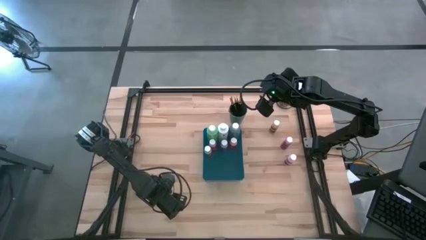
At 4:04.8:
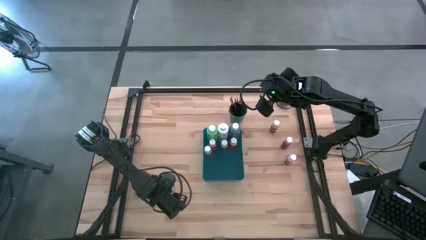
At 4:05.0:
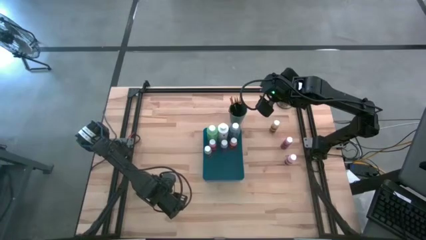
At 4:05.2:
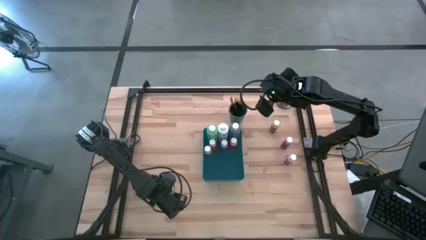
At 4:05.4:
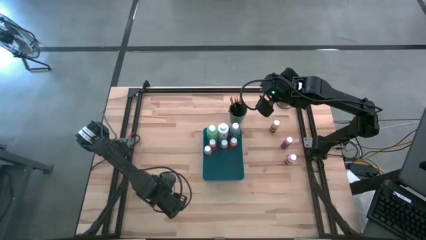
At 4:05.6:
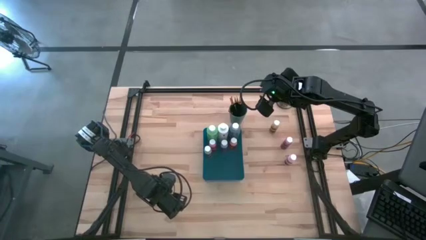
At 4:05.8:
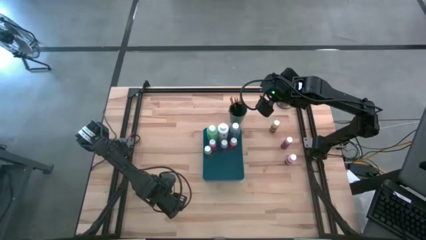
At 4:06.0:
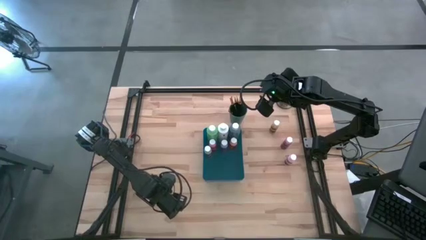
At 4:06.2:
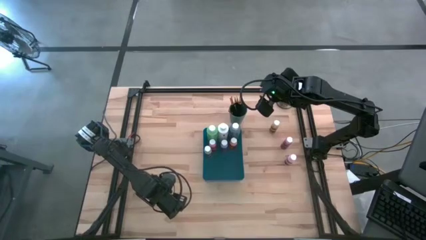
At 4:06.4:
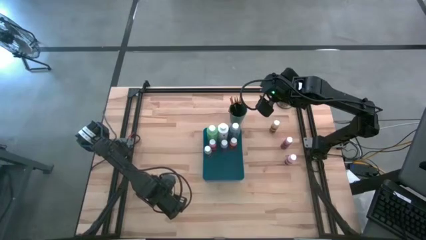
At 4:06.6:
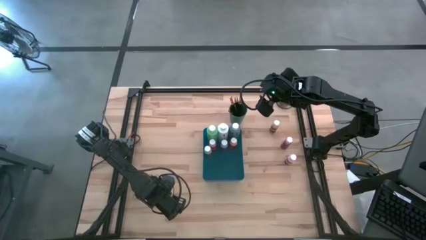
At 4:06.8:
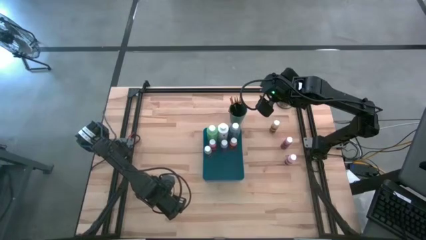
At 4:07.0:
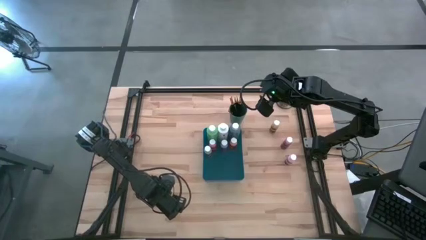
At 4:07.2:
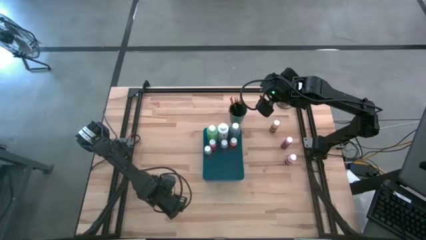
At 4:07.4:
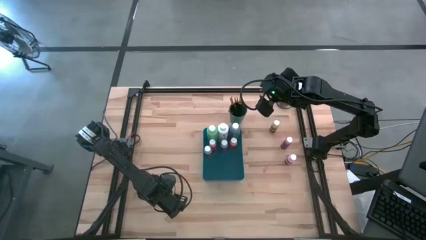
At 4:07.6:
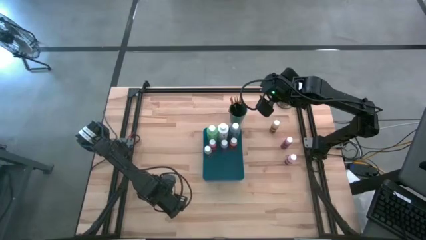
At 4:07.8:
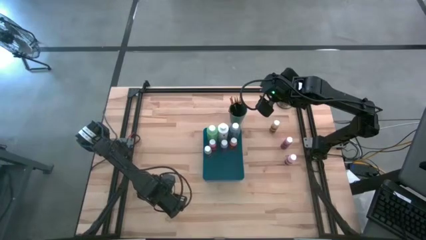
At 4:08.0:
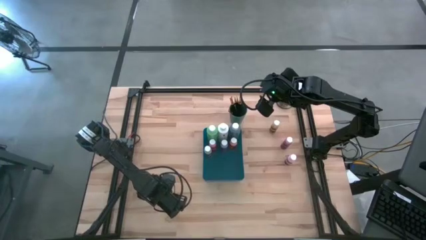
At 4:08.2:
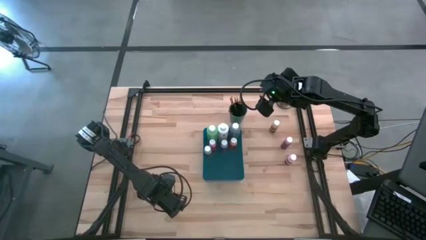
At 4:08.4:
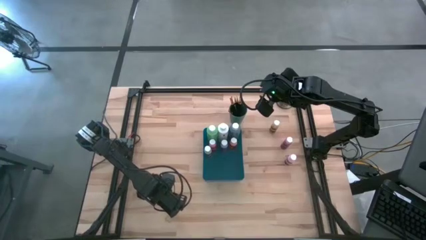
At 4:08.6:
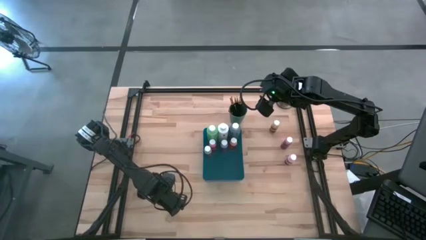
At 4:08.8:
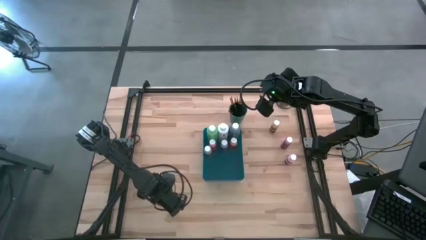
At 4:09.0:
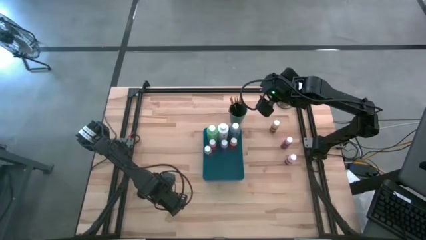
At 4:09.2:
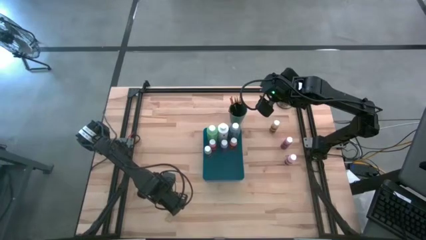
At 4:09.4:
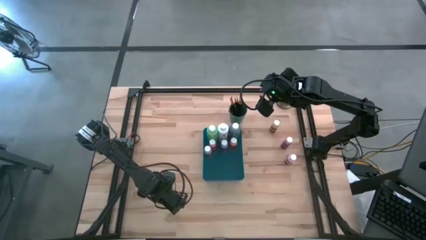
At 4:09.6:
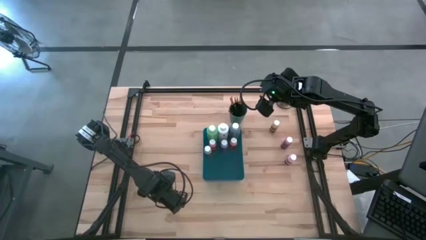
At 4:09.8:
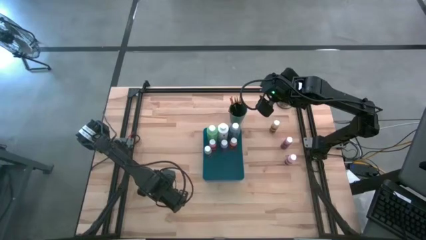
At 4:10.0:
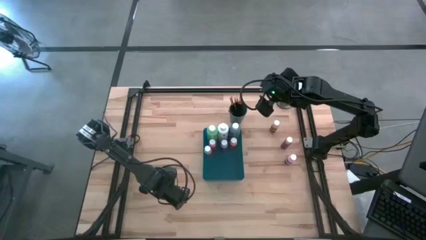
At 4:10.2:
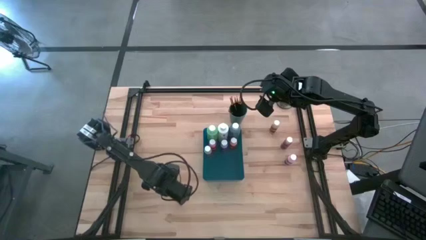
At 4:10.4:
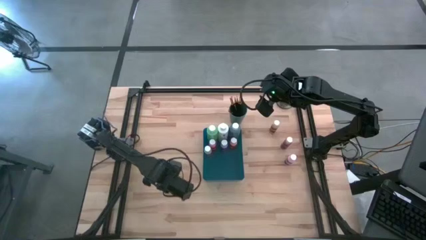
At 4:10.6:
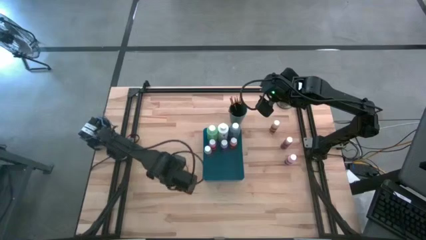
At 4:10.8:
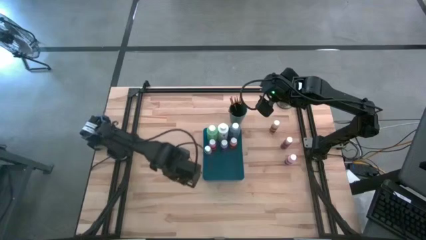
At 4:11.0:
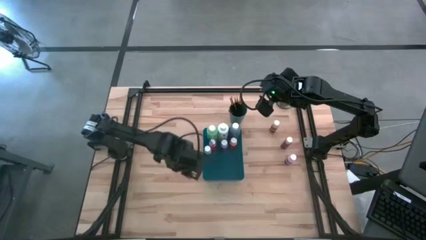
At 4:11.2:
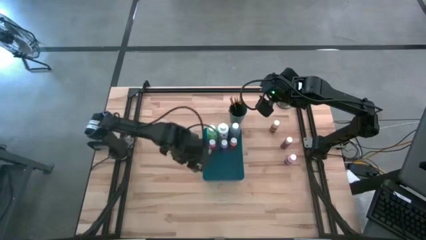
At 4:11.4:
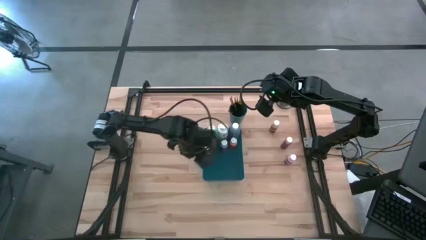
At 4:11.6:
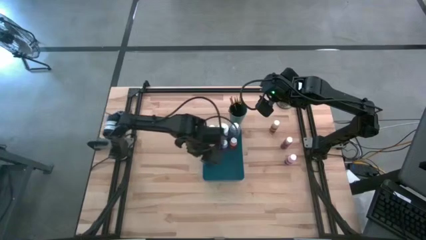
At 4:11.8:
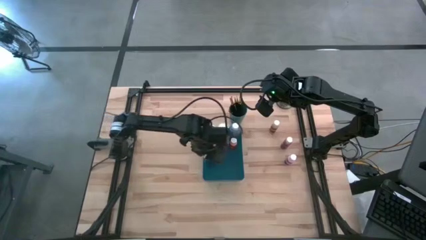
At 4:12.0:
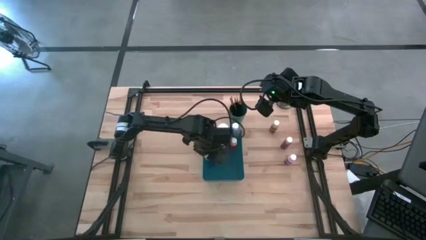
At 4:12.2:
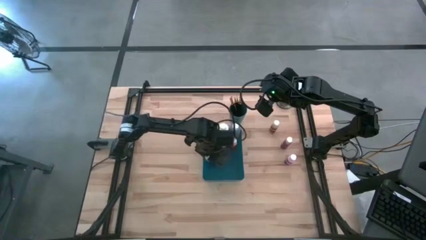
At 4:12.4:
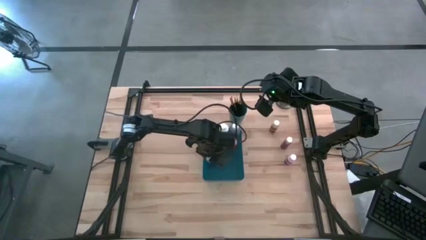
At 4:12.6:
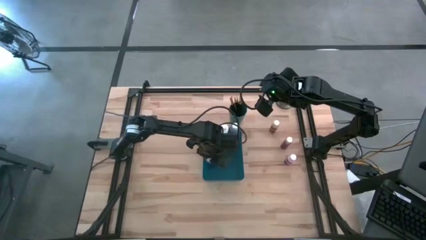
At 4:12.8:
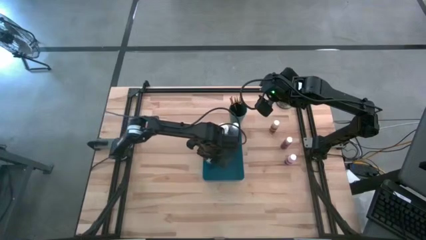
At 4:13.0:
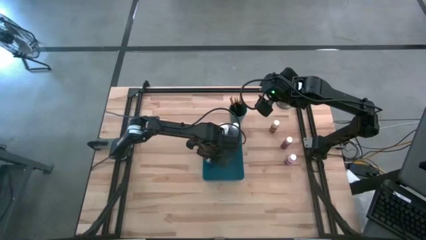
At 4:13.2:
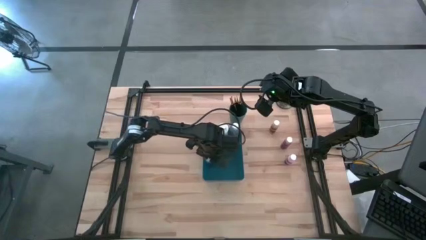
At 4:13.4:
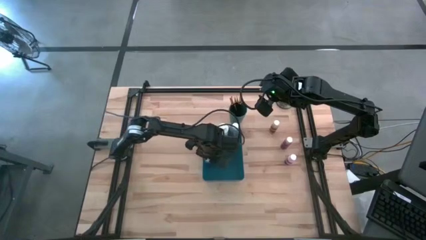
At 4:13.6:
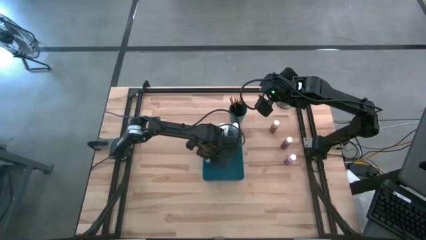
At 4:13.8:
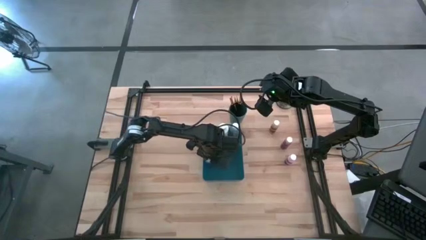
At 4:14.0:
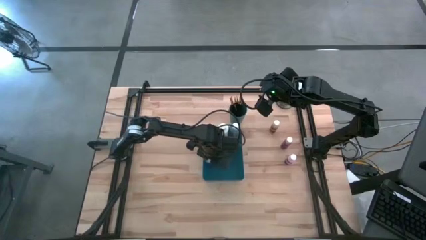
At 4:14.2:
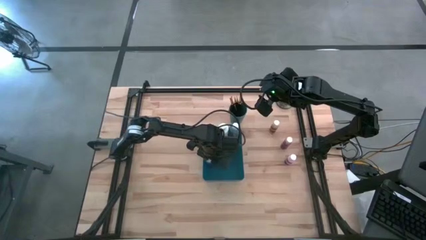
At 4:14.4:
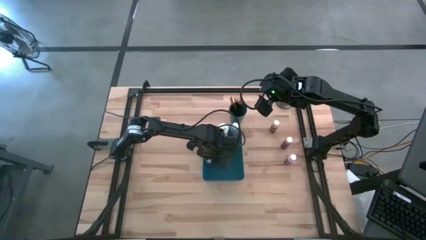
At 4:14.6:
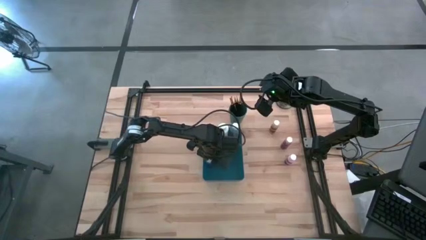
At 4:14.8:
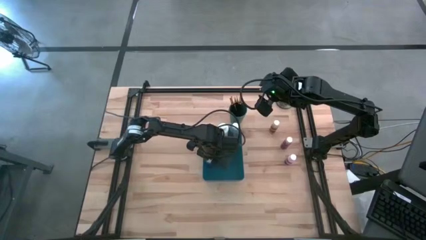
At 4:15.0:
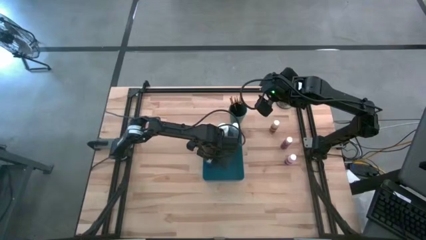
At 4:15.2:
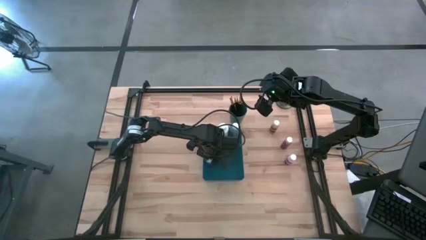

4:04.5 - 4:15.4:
Task: Pick & Place Paint Supplies
Put the small blue paint bottle into the blue bin

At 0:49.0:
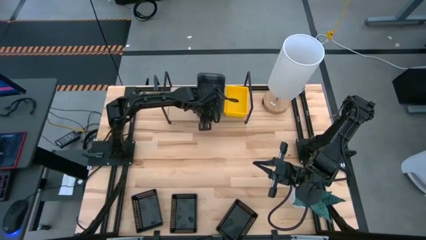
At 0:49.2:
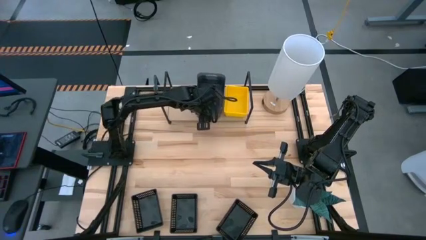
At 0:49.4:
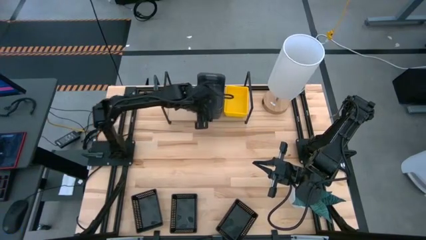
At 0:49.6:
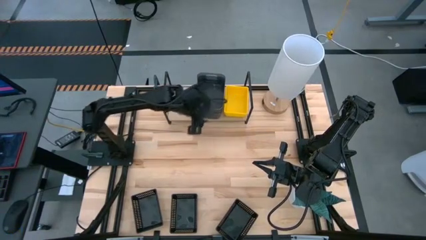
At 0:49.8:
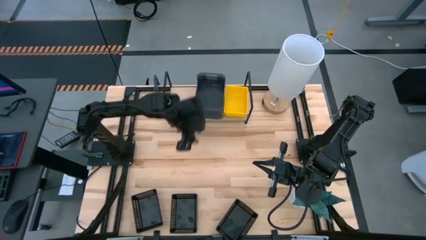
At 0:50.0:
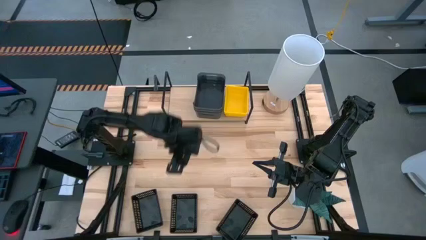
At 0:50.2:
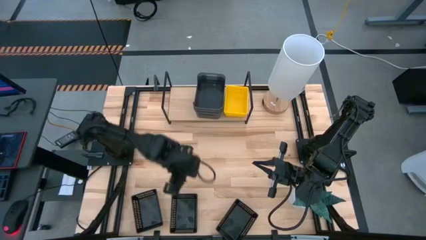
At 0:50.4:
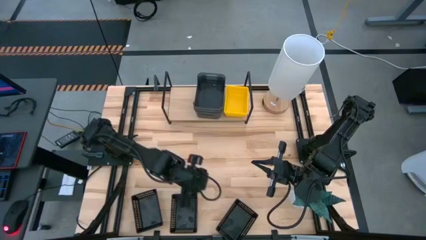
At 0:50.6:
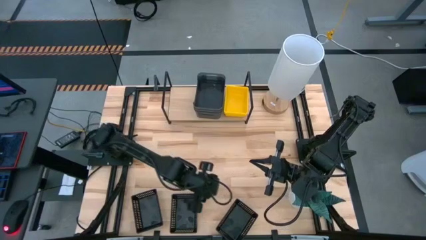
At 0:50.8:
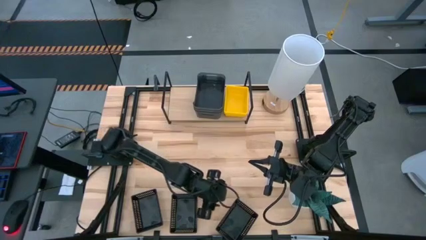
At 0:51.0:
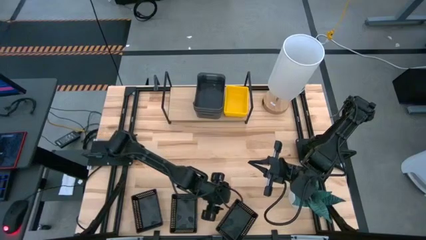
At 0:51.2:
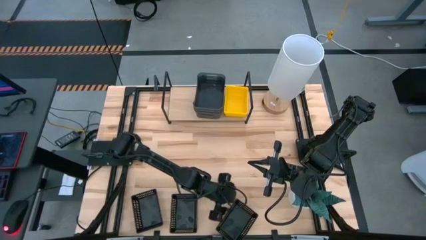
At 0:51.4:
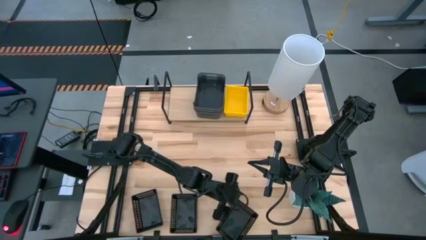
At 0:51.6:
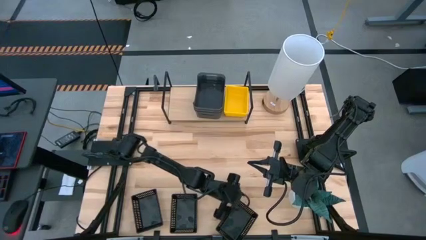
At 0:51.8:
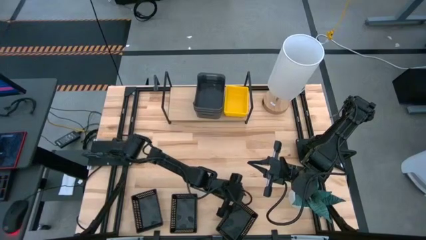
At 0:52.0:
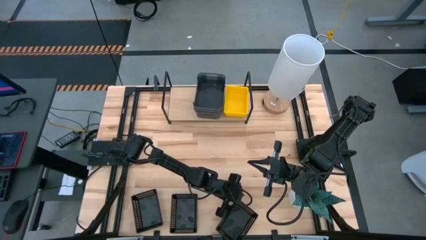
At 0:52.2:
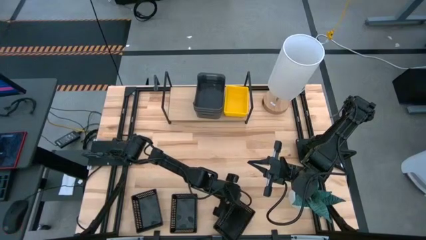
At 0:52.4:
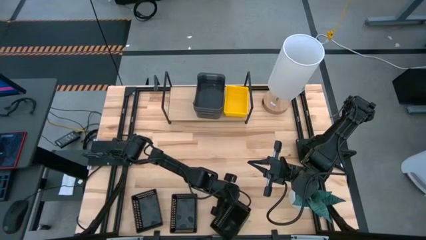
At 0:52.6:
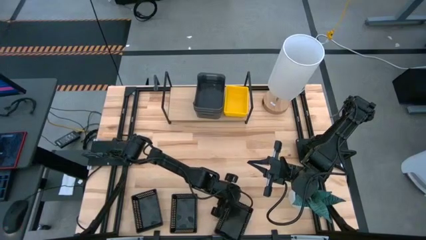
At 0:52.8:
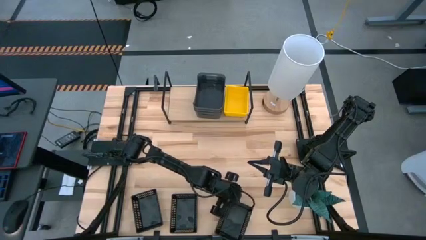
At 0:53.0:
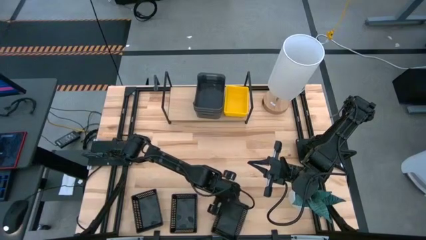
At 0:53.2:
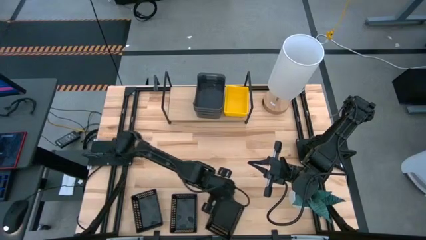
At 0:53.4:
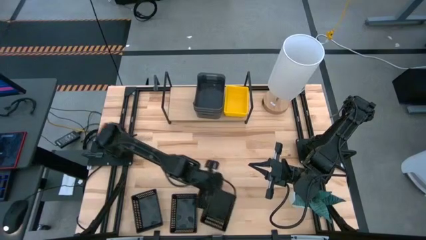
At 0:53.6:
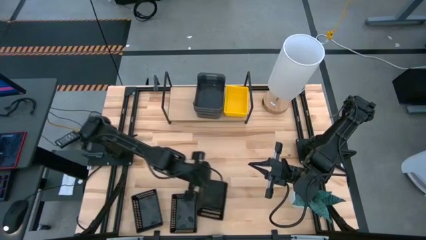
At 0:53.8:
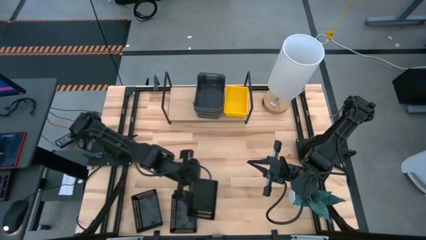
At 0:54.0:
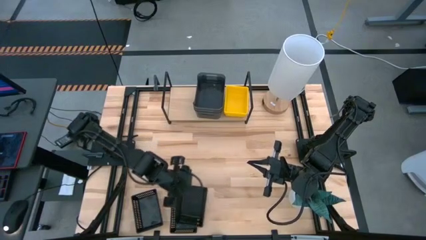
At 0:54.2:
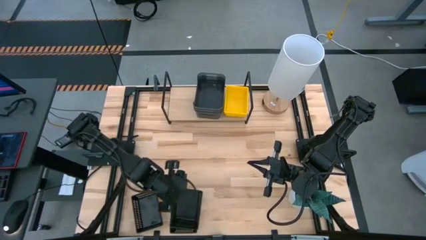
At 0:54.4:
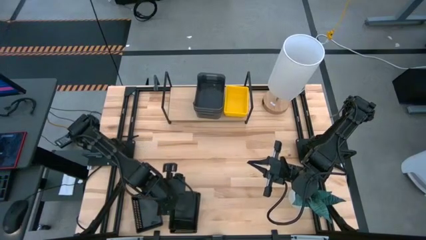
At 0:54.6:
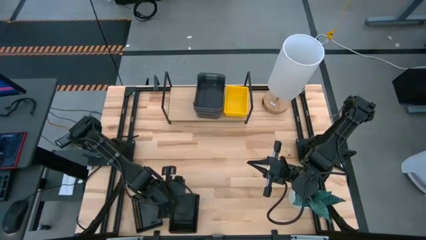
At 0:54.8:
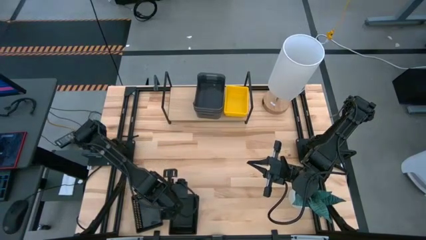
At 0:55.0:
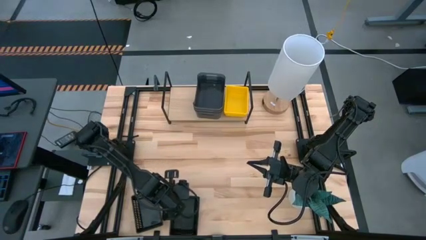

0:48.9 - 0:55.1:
Task: Stack baskets on shelf by color
Stack the right black bin on the center black bin
